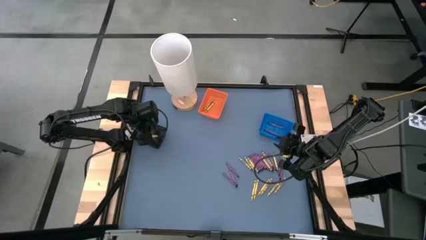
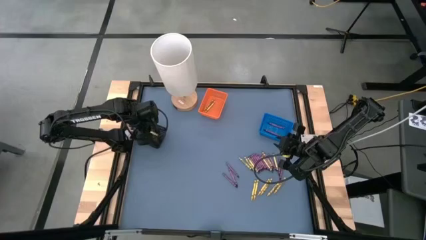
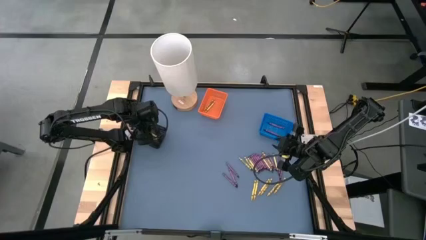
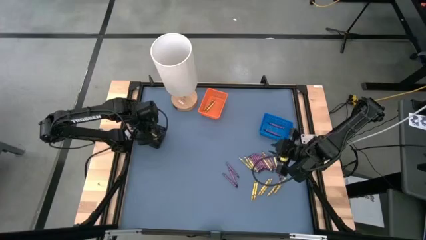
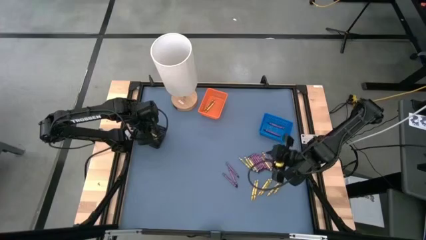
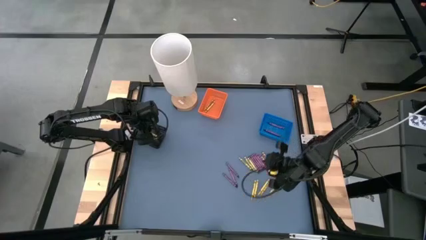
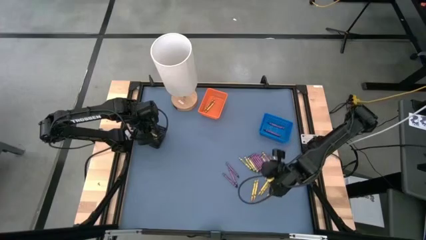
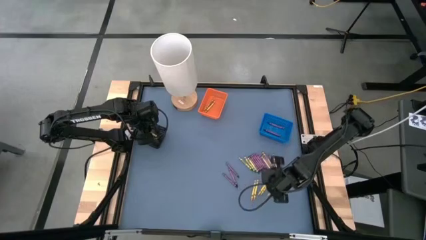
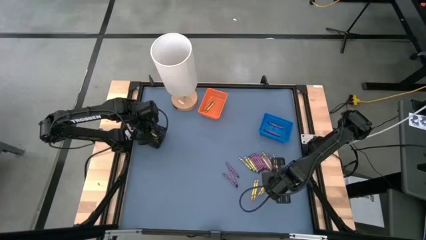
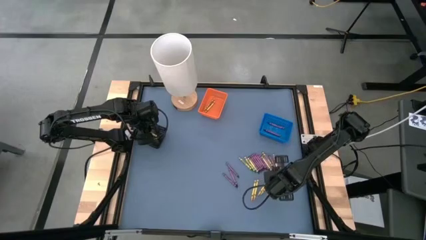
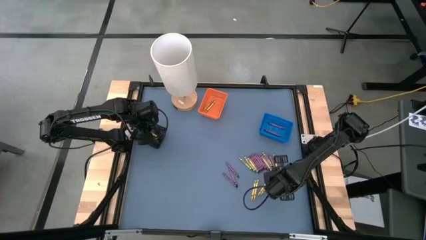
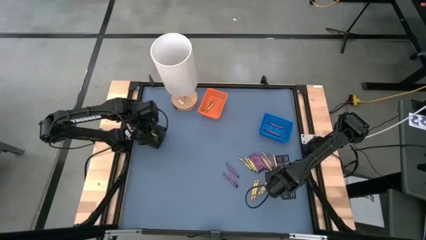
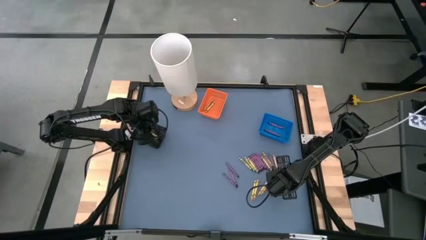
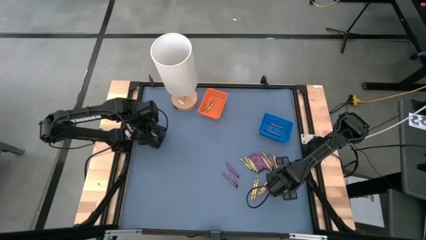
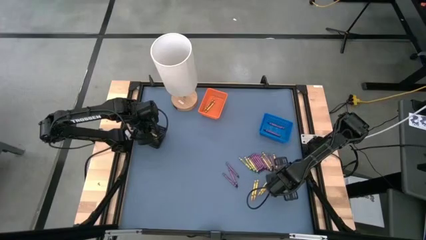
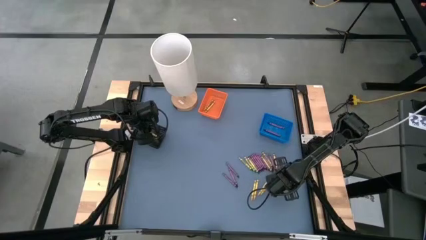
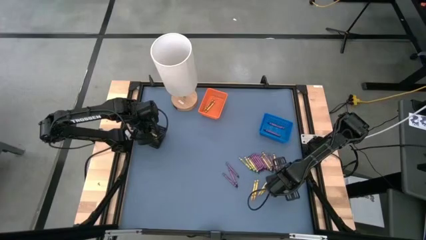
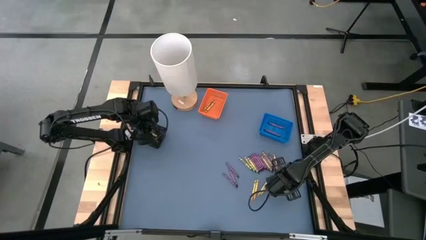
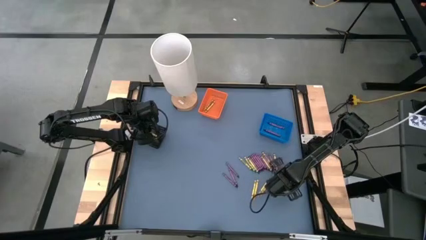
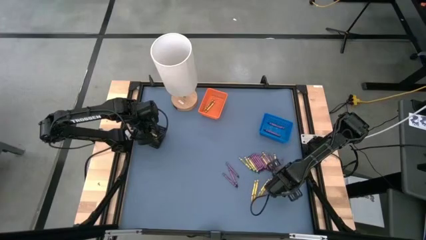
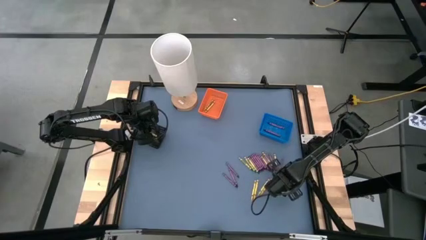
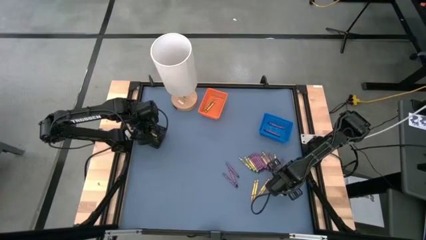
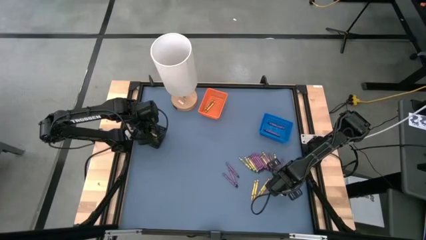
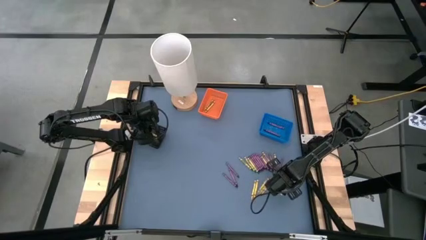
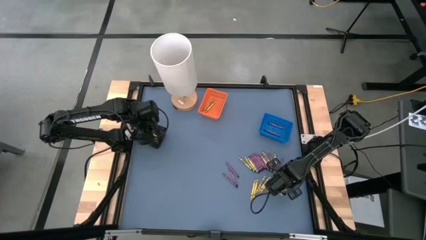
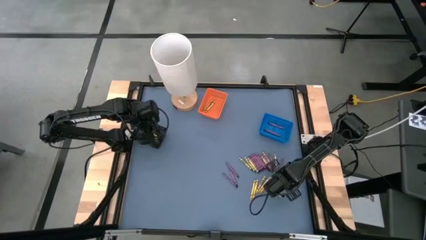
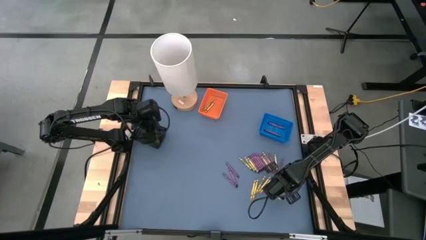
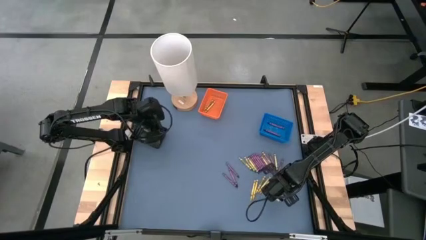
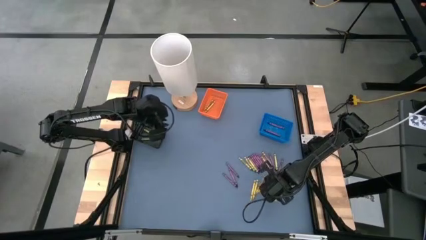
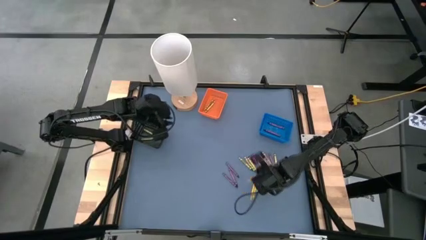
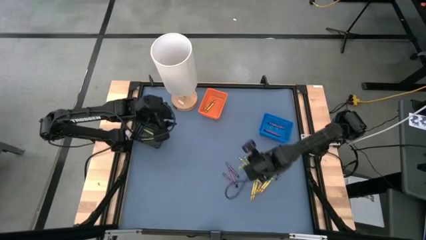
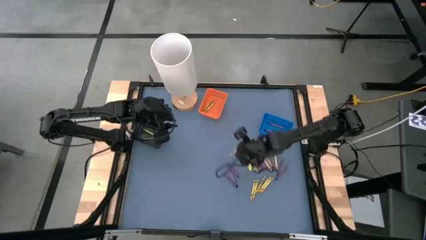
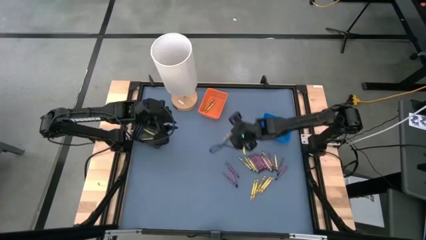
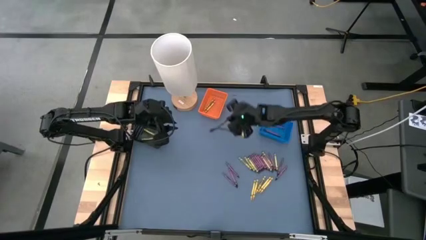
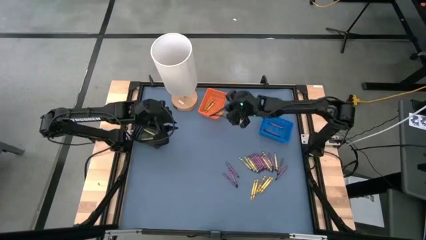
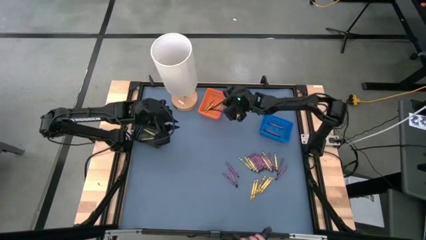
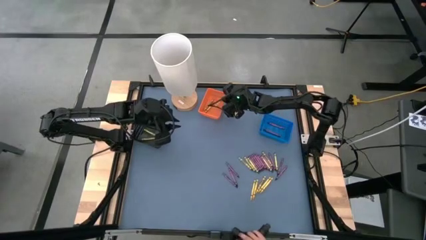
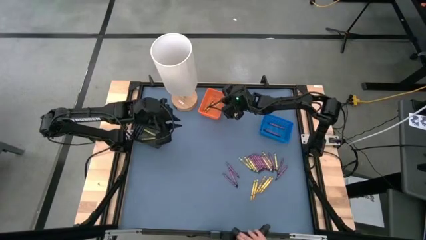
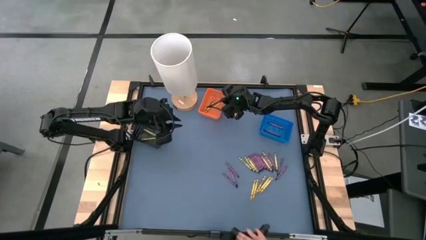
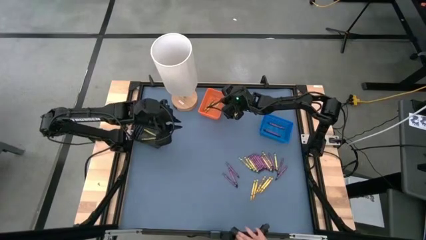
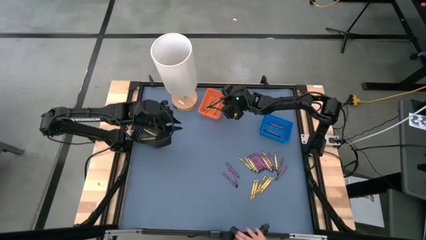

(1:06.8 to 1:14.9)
Task: Sort crayons
Put the yellow crayon into the orange basket

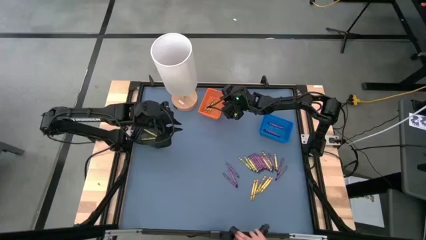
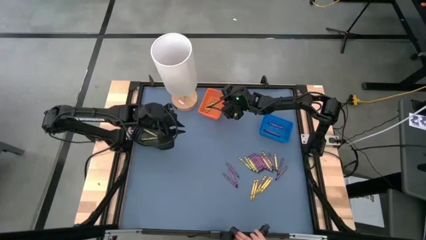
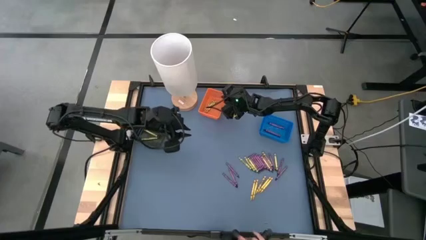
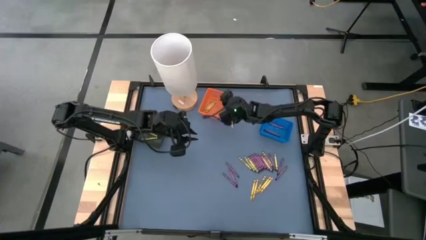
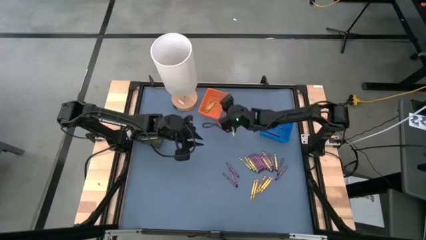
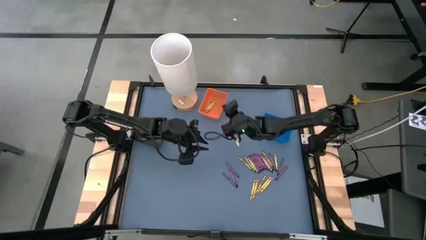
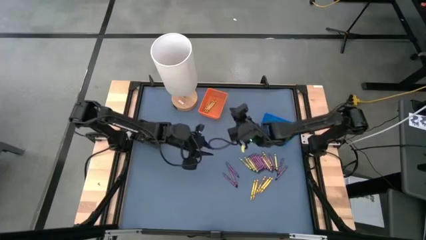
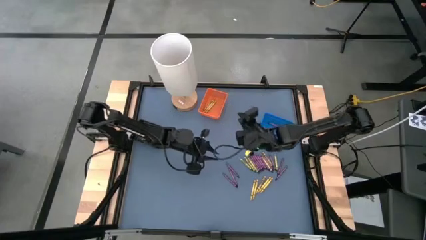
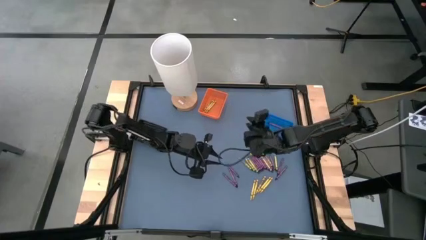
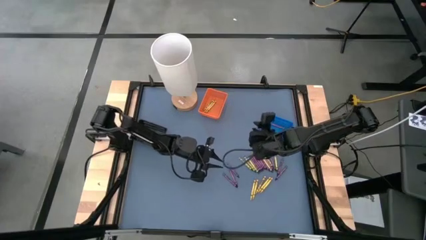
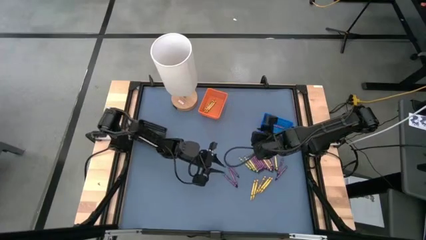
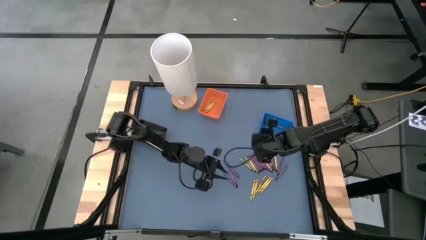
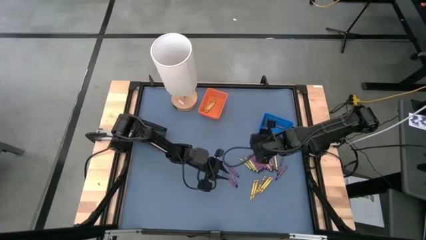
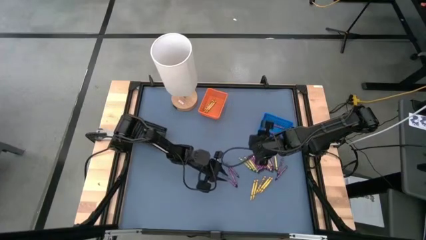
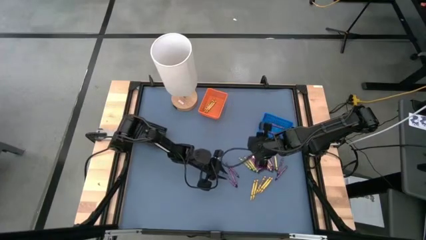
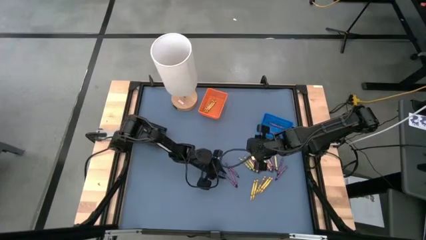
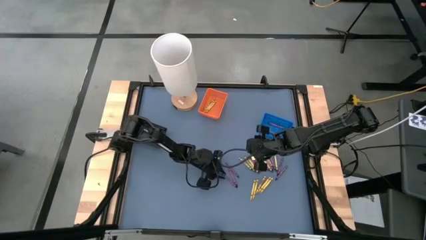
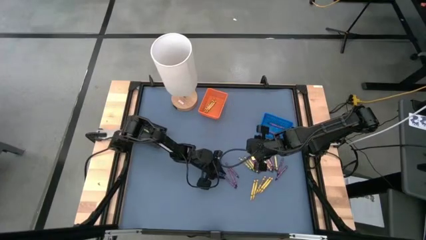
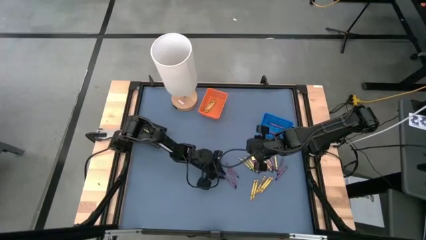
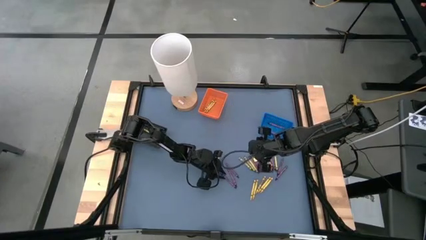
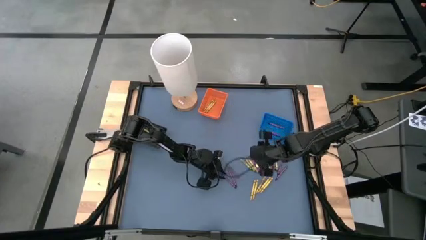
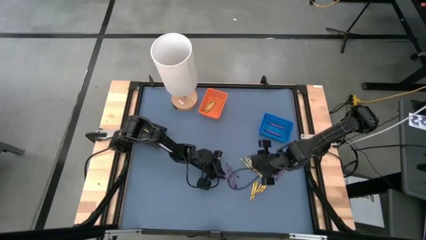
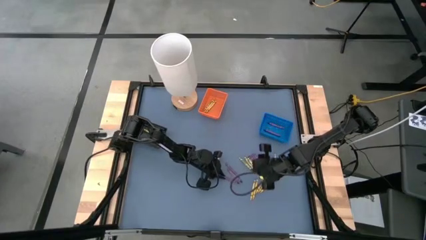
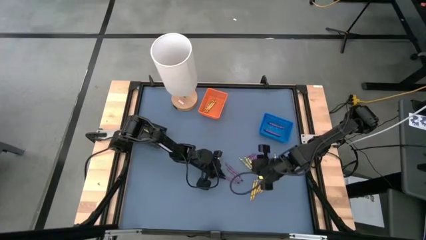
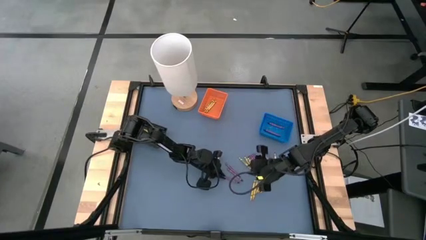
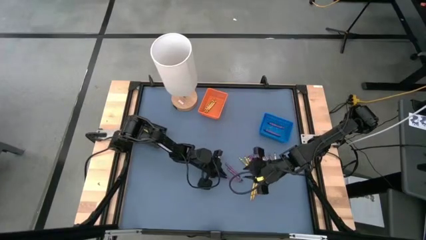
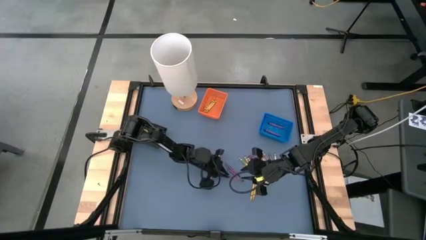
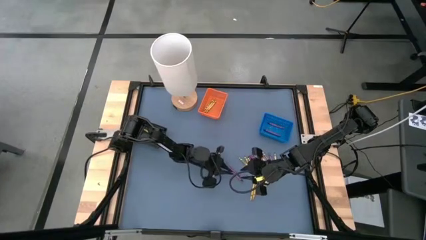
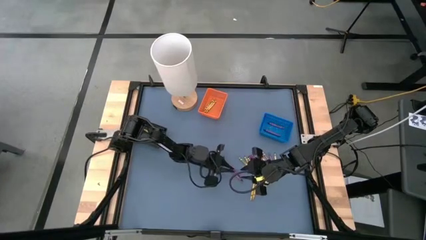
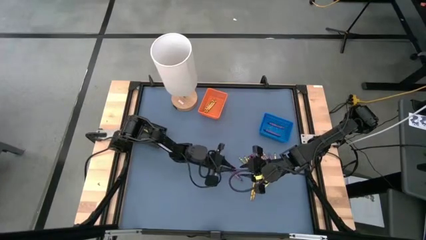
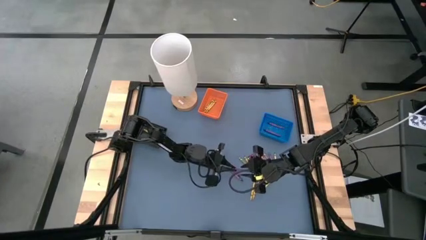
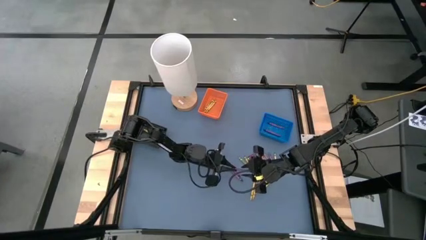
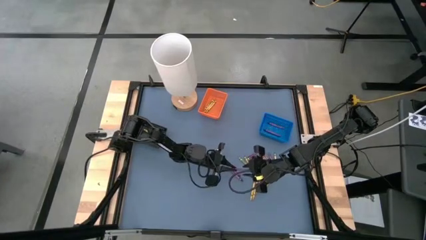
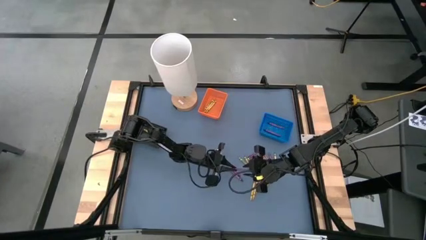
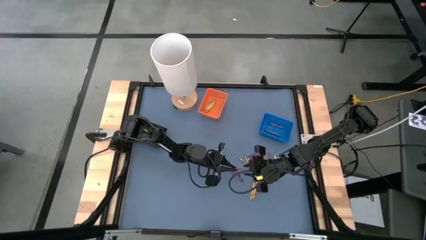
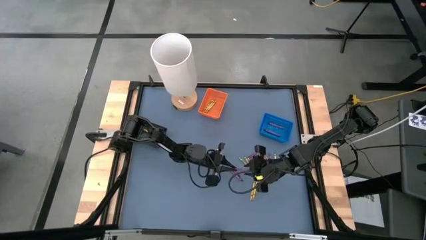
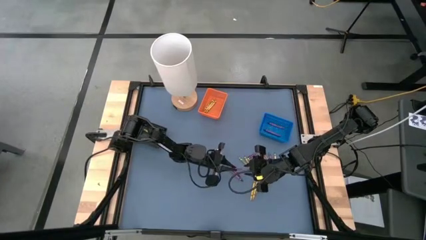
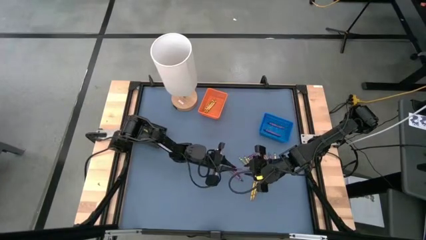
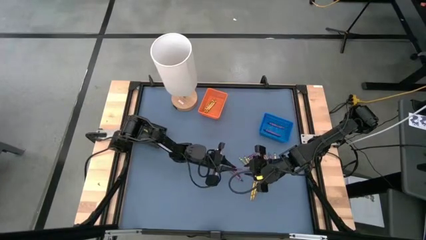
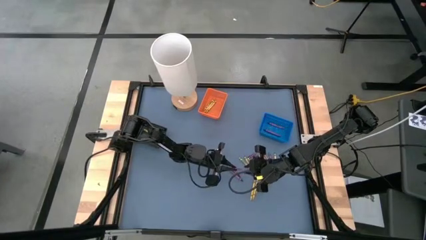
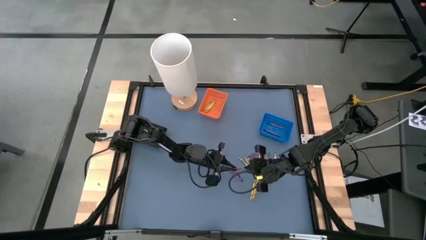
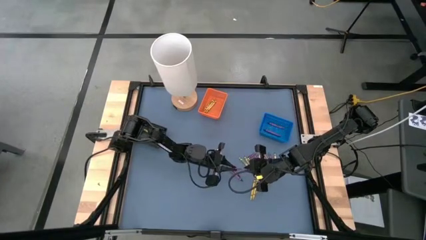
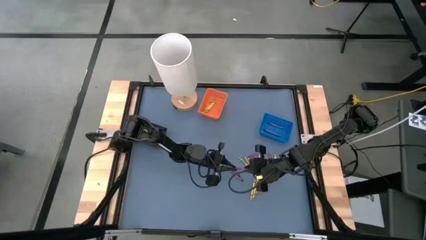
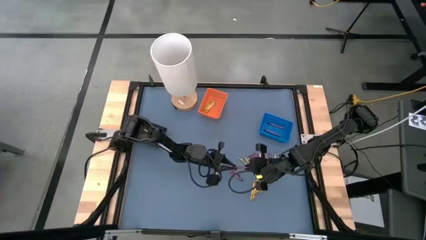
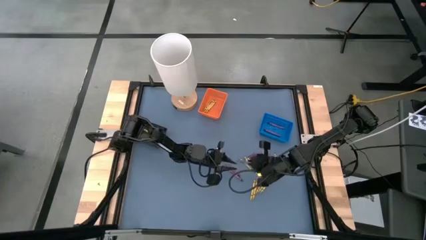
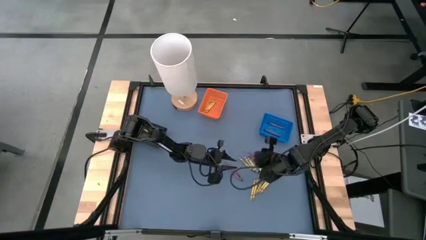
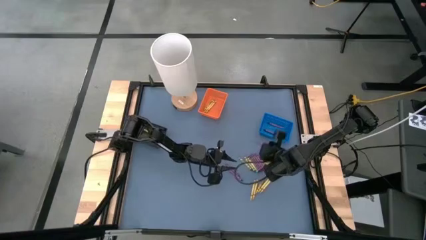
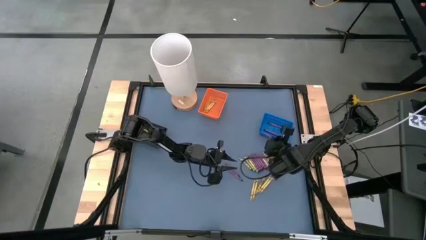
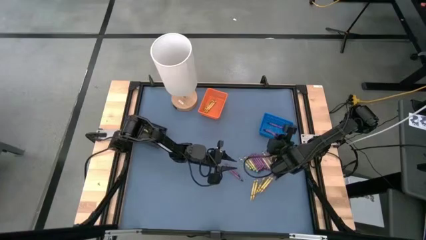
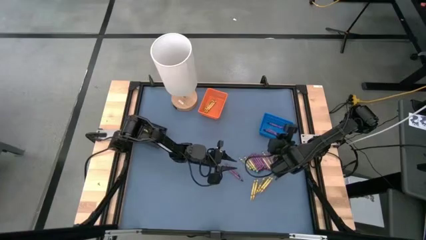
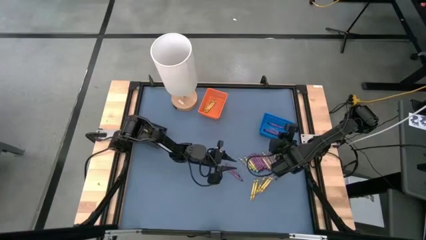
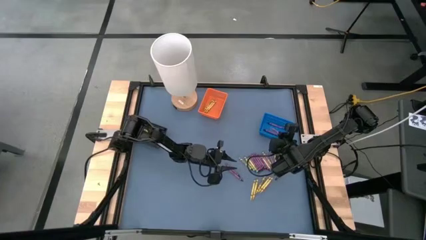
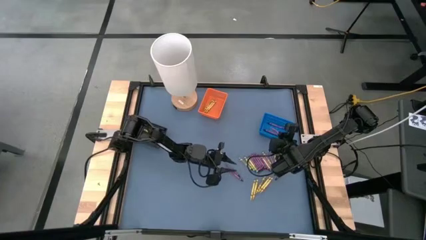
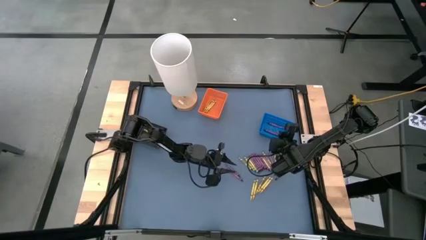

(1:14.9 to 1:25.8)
Put the violet crayon into the blue basket
